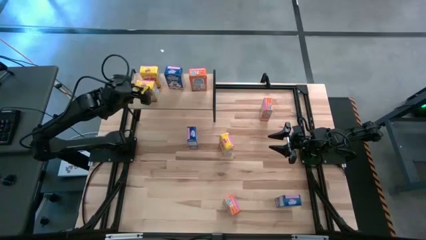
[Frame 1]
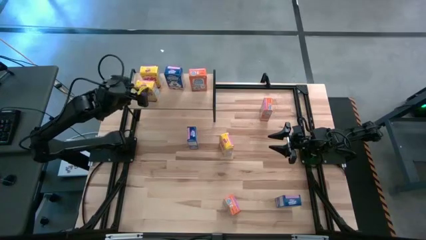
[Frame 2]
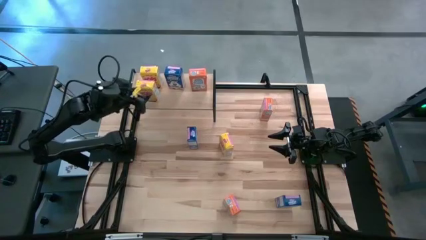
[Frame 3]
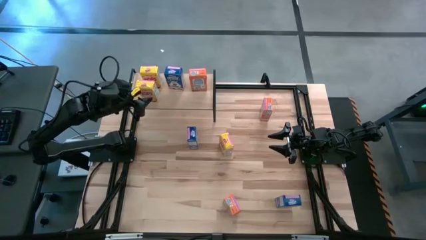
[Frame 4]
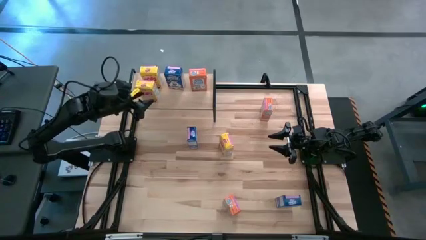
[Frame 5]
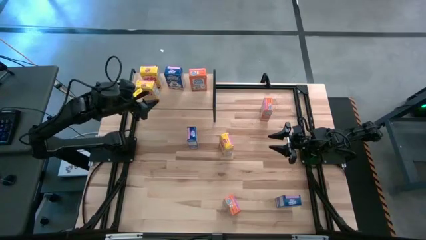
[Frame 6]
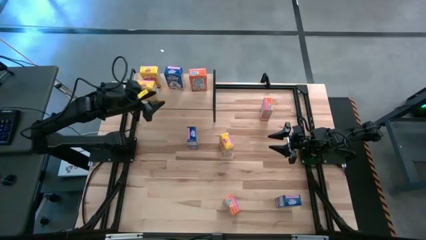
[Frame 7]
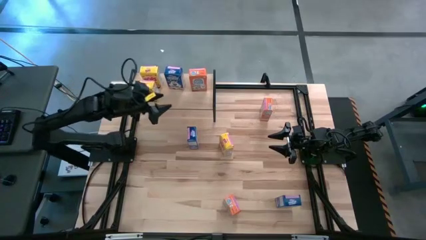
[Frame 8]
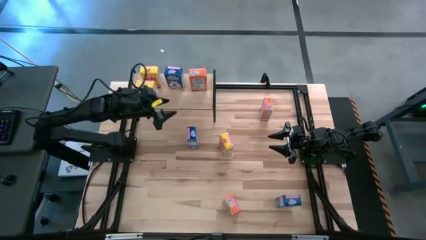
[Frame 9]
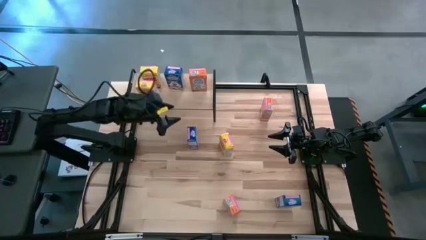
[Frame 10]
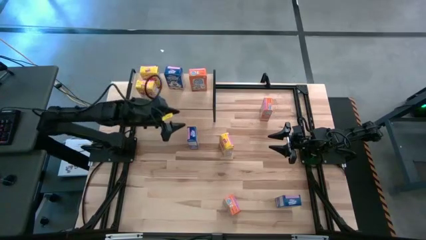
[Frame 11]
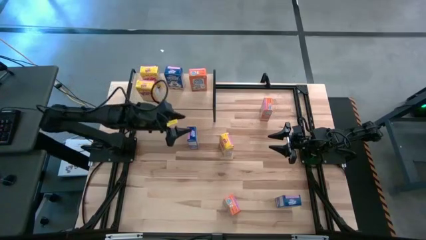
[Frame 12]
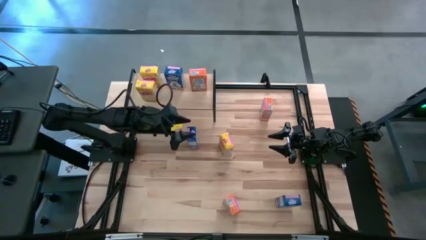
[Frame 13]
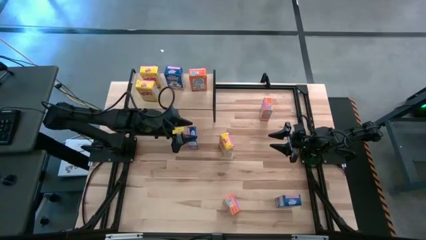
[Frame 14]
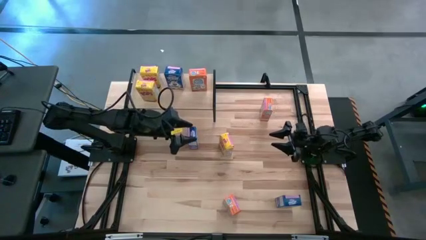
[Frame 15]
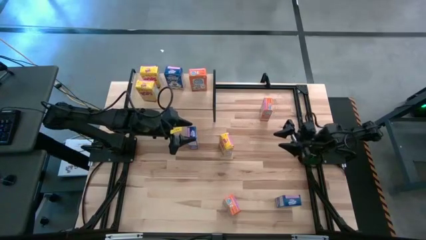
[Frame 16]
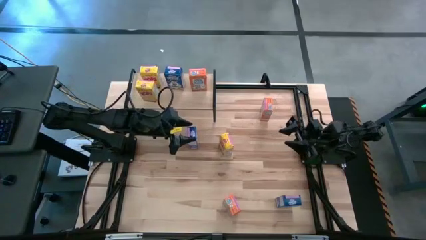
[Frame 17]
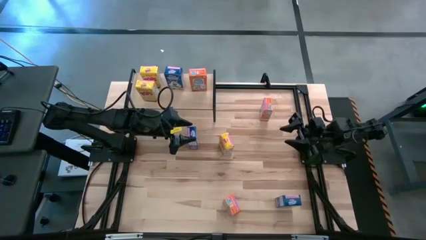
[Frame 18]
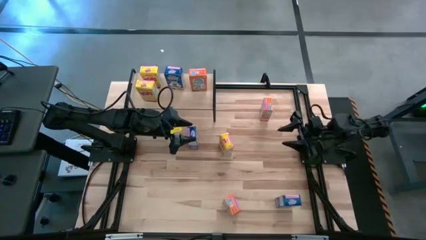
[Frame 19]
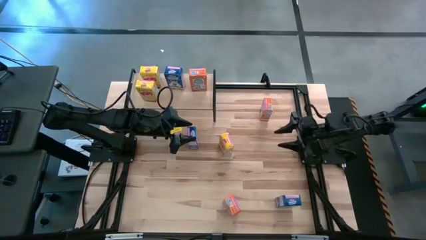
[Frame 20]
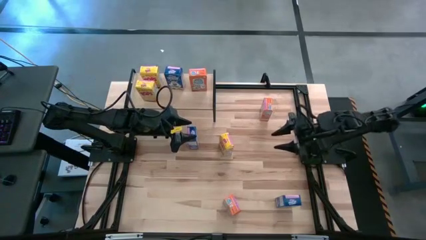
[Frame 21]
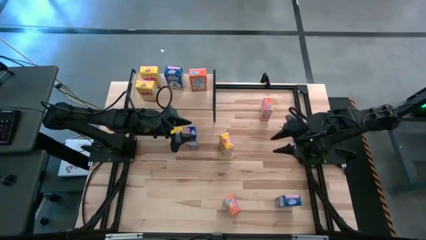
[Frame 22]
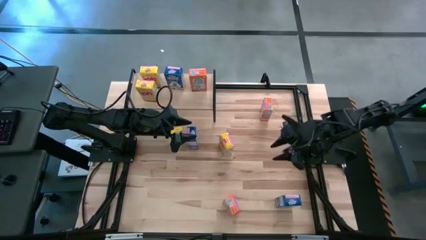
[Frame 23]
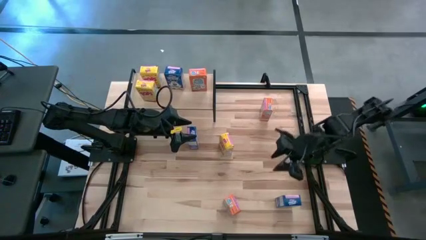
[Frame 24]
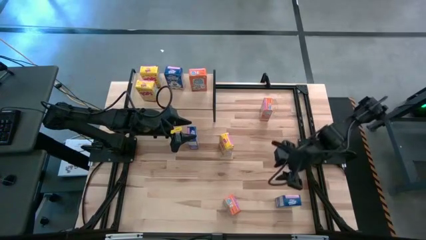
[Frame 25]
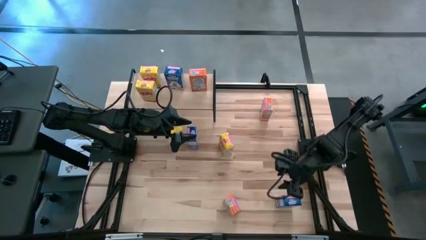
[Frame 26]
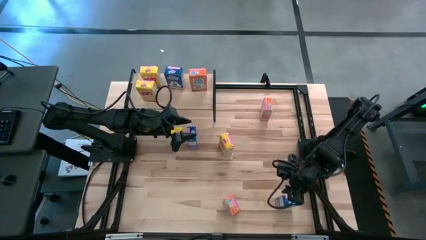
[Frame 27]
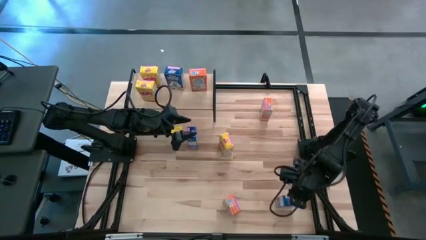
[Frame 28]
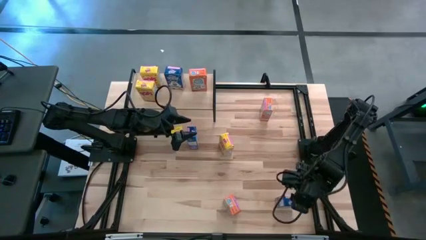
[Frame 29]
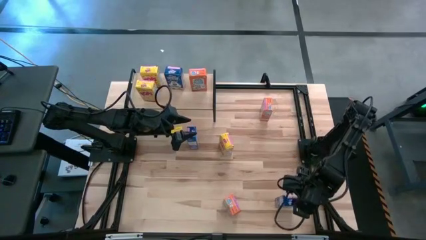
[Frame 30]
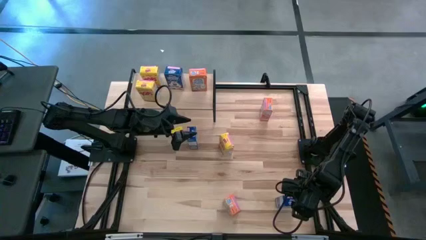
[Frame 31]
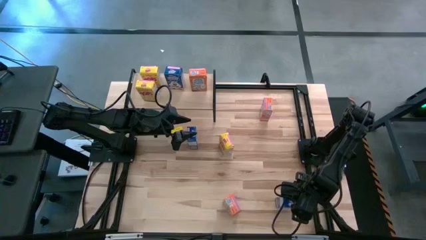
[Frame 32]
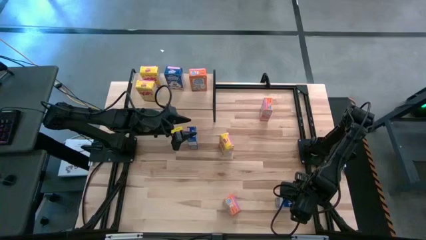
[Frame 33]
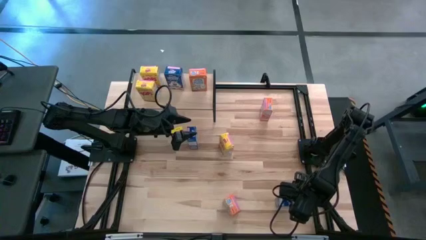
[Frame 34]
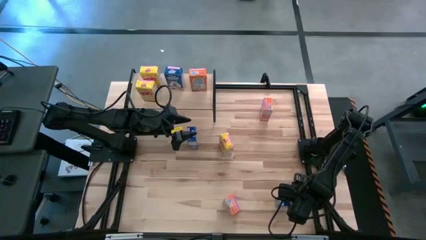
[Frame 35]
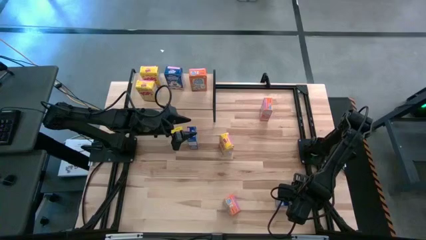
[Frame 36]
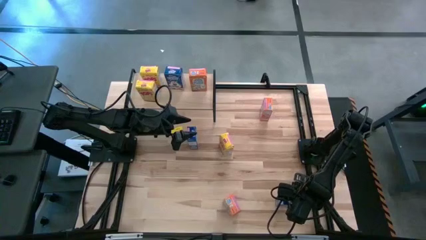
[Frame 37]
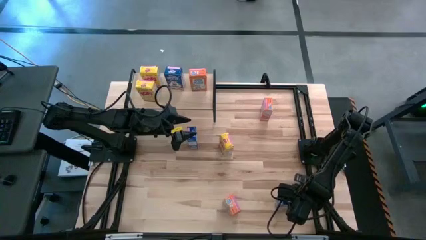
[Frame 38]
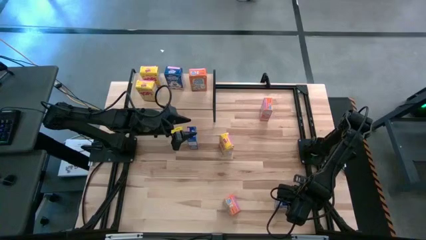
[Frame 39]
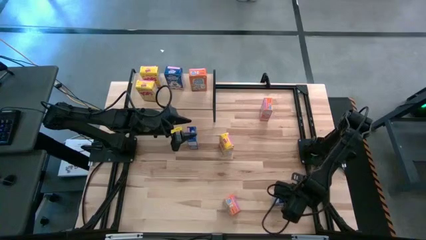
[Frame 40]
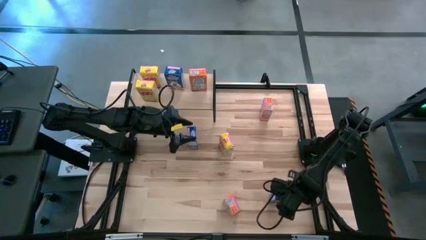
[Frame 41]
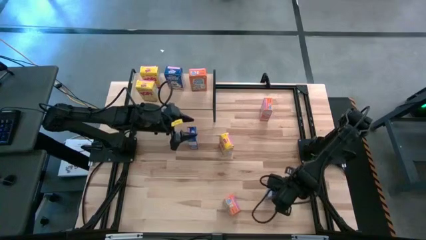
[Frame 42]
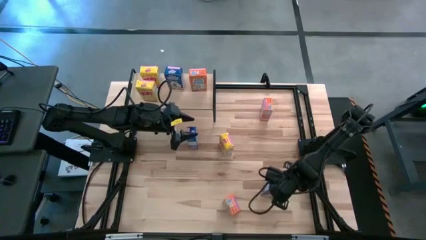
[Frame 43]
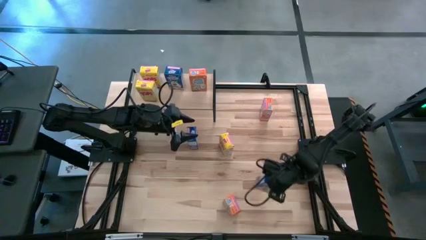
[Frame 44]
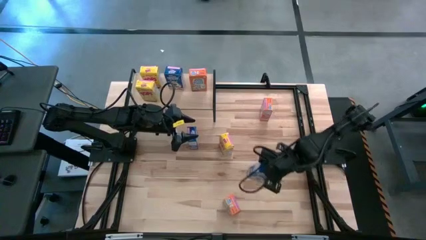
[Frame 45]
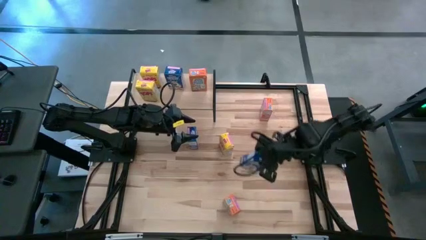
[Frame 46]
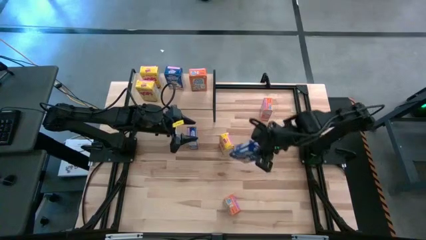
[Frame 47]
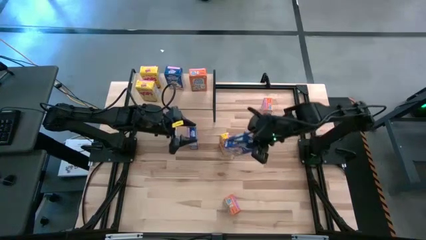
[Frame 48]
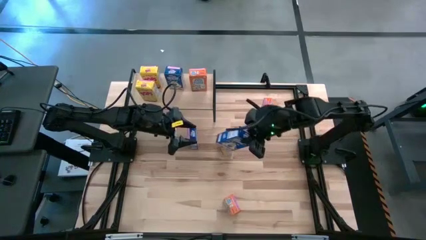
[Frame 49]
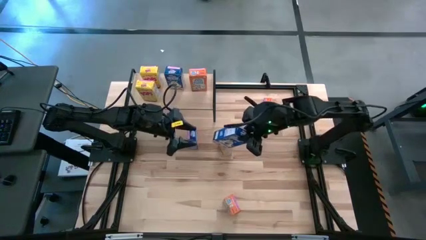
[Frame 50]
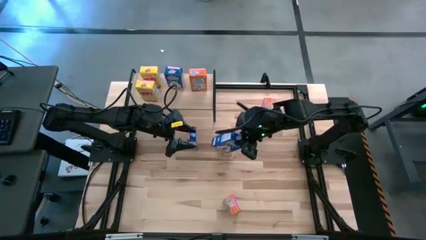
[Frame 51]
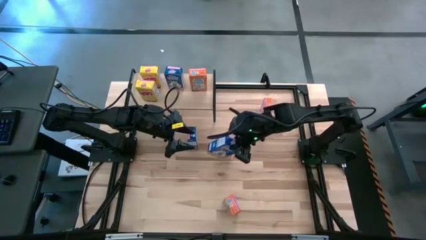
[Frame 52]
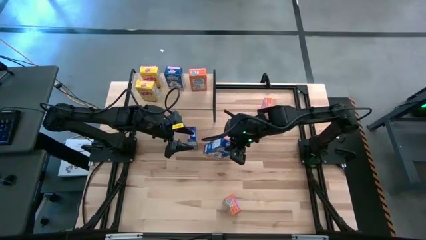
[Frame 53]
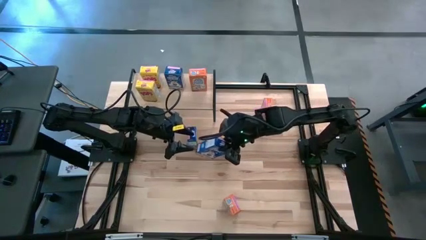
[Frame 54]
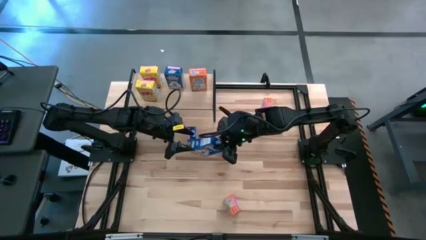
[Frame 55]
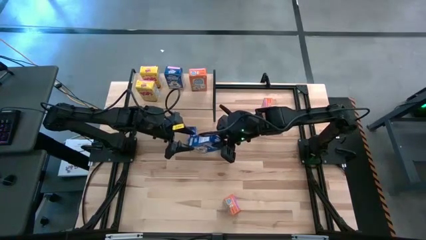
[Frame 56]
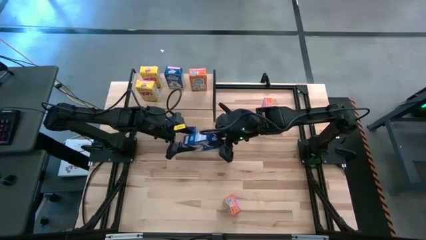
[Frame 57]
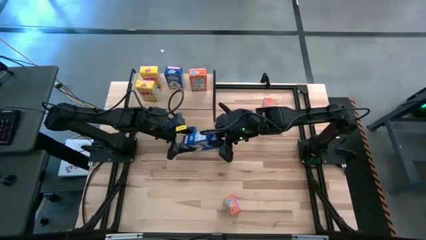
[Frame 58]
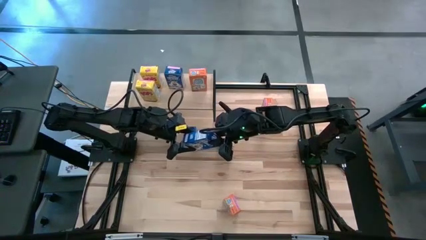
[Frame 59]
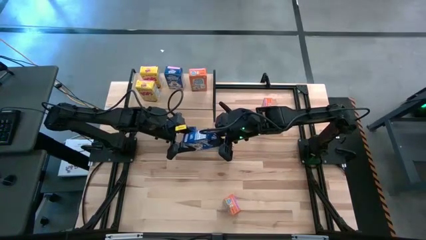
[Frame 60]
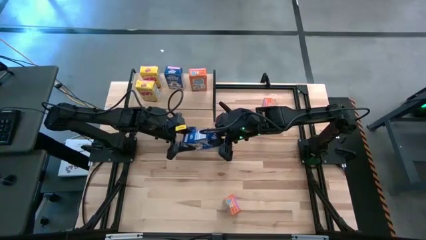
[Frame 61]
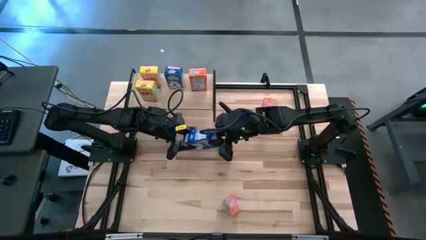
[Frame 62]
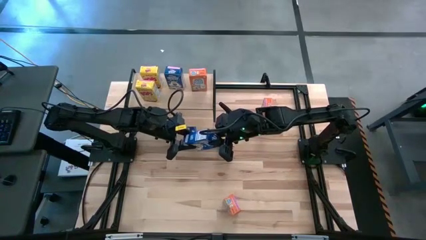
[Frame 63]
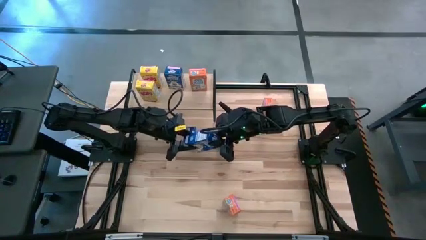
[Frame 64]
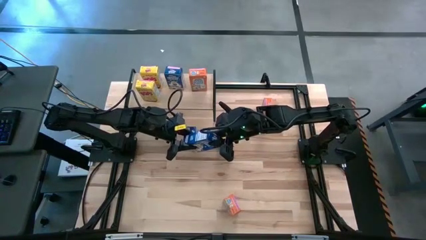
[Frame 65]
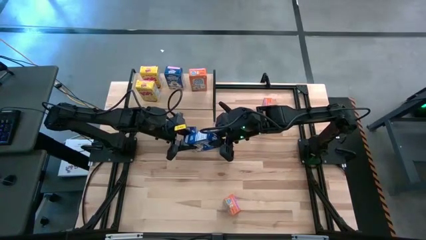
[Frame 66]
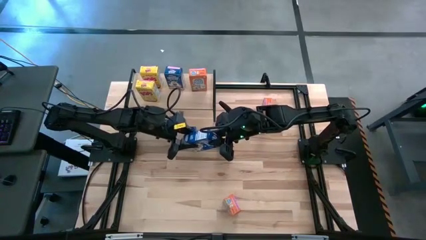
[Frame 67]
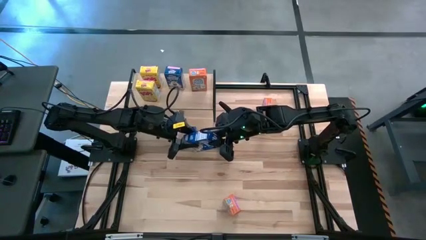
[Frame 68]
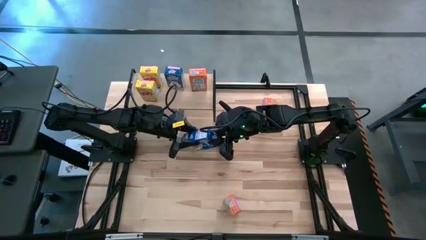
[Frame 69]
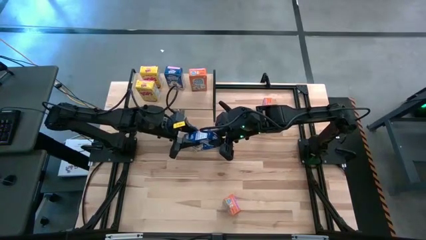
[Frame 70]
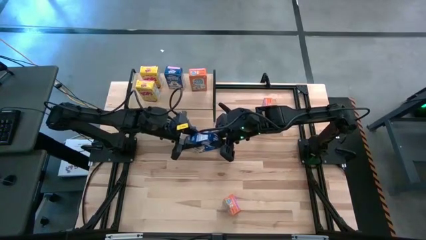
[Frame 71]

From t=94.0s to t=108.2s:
Task: Stack cereal on shelf
Put the right blue cereal box on the shelf aligned with the other blue cereal box

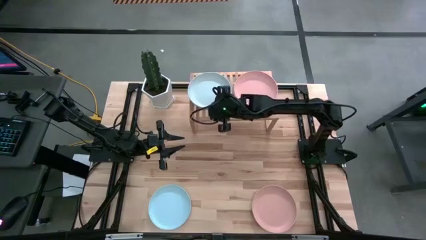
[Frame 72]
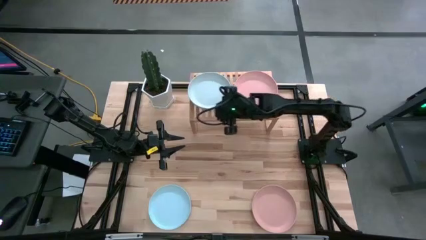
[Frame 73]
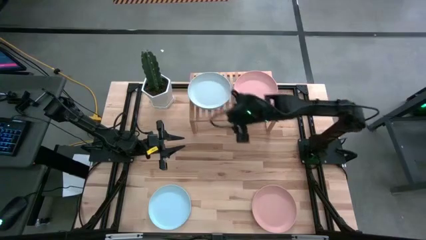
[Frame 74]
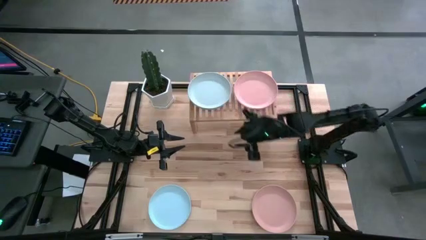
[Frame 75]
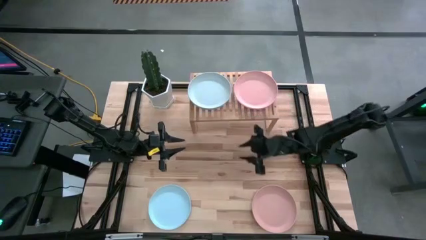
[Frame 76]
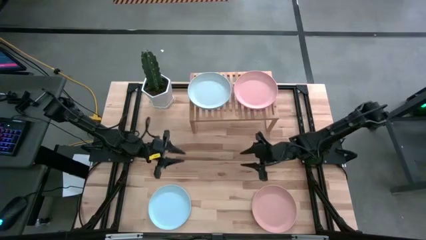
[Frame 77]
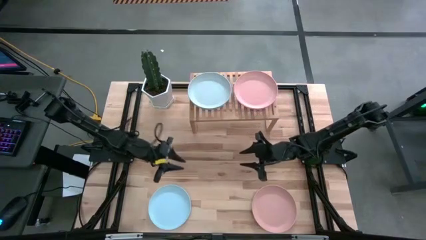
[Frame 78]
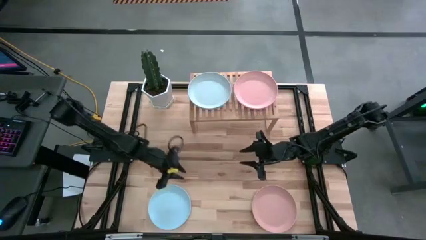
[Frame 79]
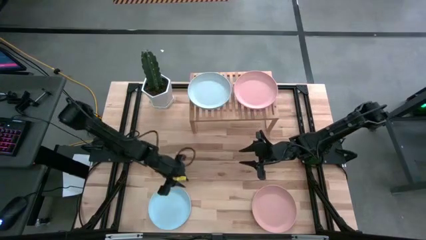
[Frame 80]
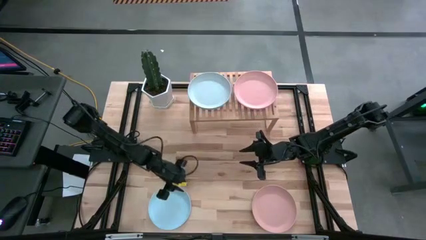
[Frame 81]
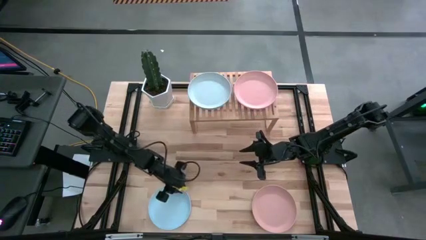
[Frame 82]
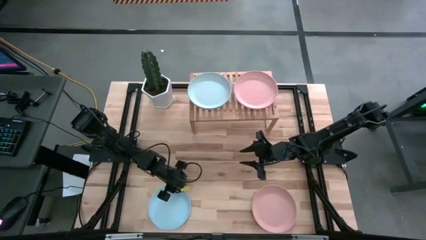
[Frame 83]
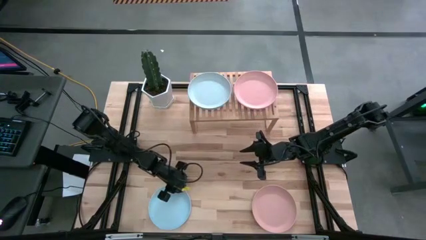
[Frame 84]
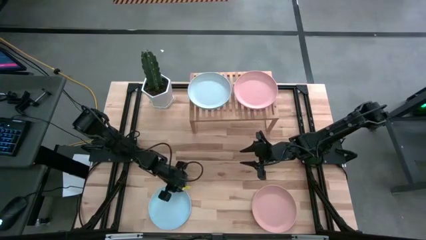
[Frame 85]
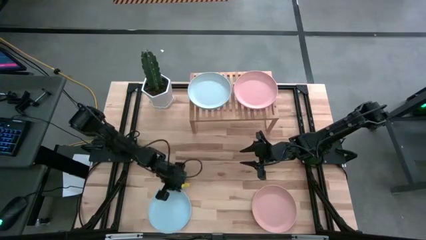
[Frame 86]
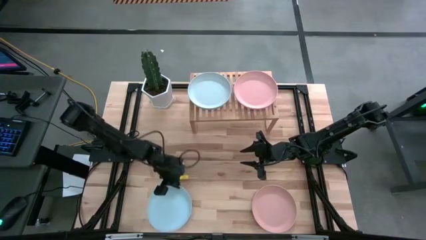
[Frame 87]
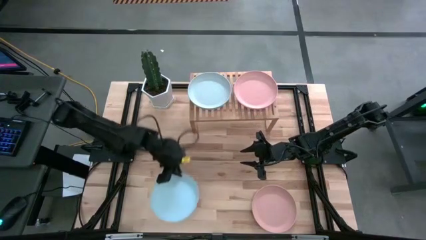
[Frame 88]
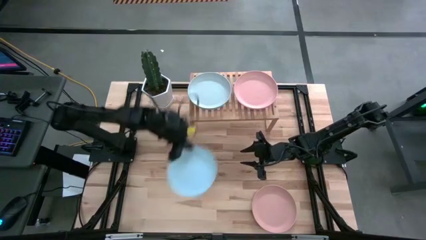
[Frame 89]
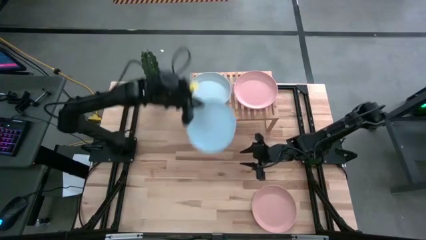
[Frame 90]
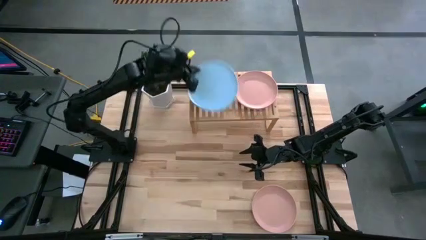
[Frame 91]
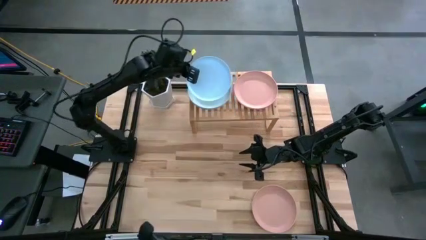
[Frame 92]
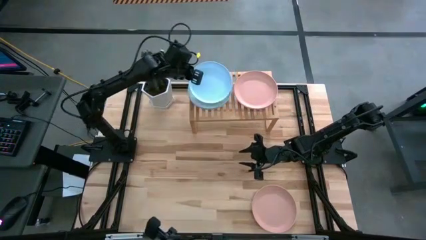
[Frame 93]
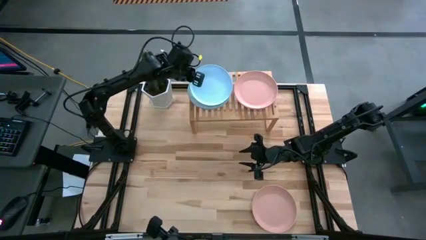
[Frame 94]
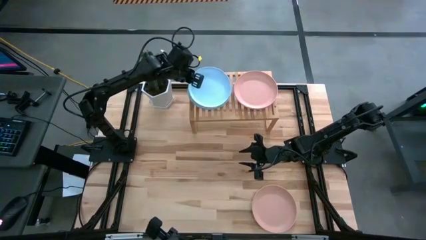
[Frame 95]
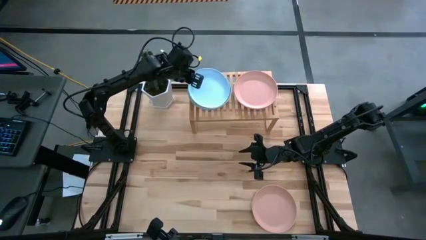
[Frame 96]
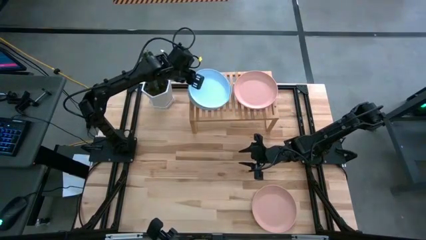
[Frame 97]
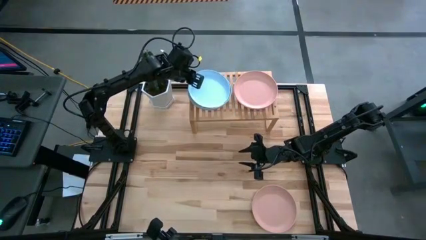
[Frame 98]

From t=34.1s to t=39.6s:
Task: Place and stack plates onto a shelf
Stack the blue plate on top of the light blue plate on the shelf
